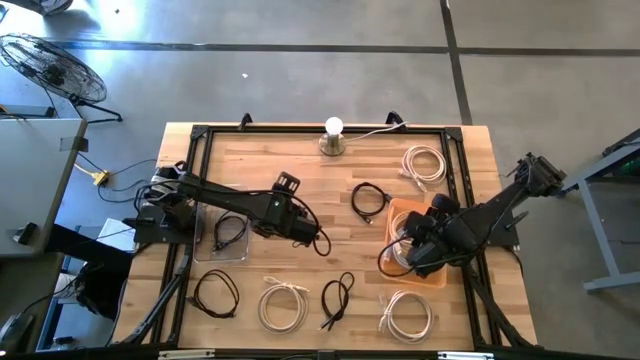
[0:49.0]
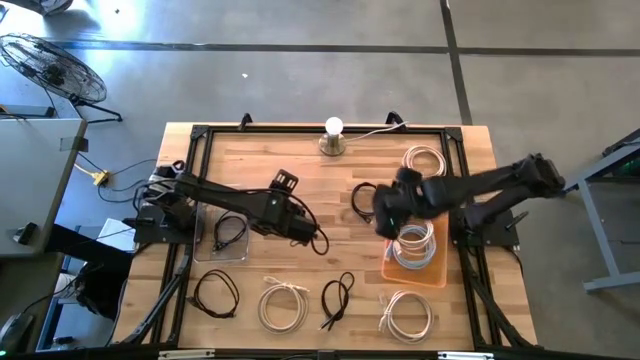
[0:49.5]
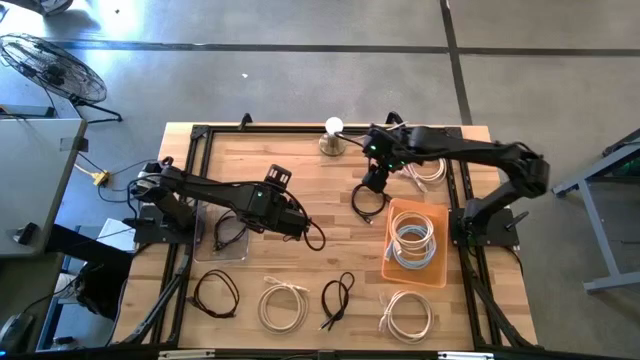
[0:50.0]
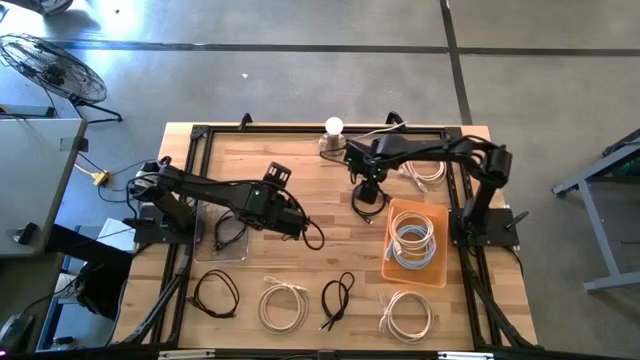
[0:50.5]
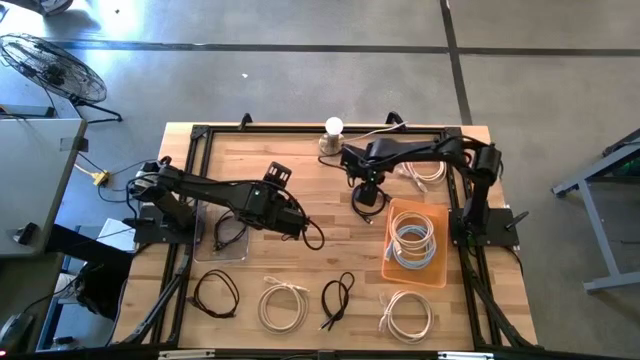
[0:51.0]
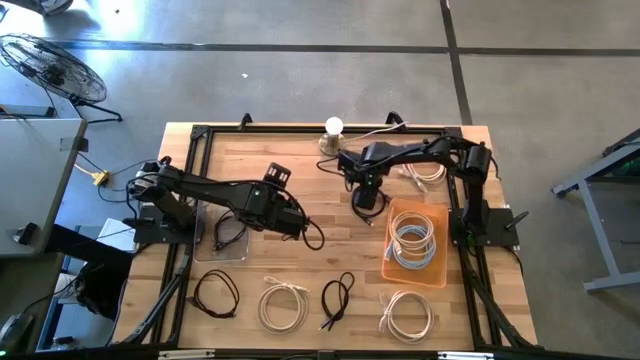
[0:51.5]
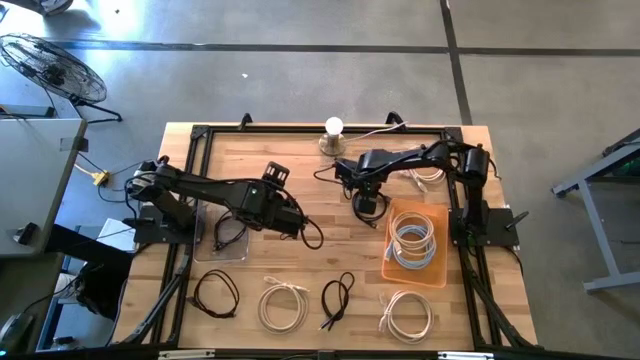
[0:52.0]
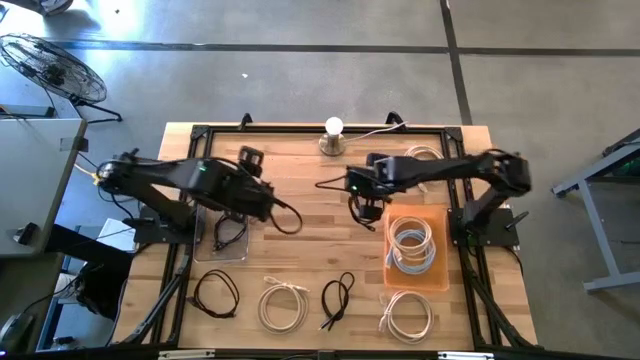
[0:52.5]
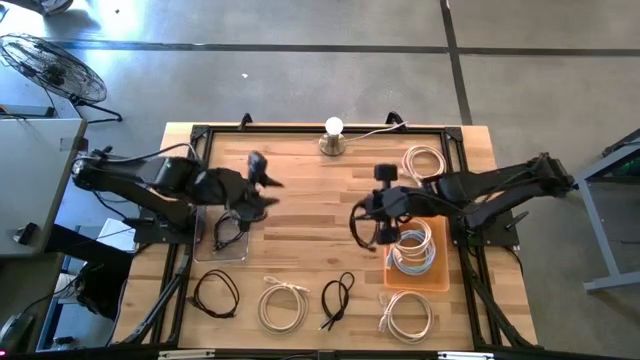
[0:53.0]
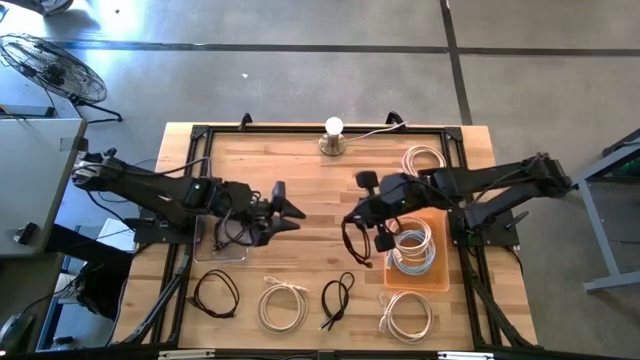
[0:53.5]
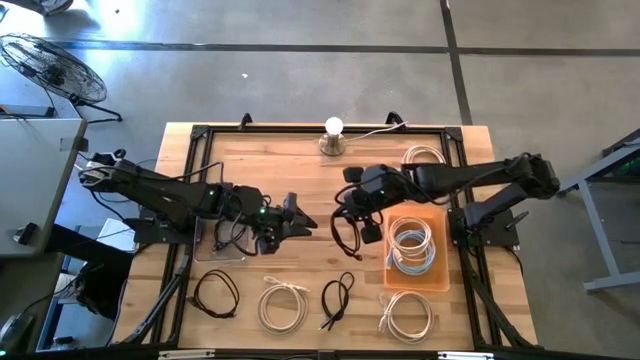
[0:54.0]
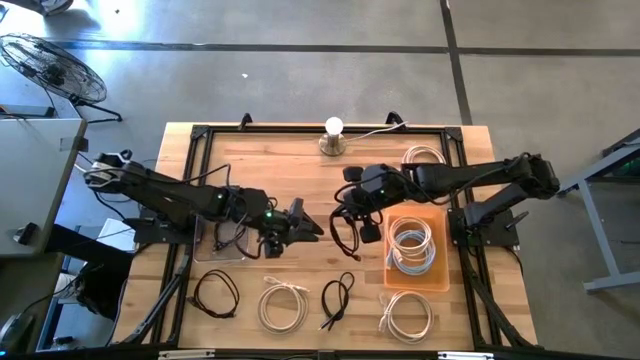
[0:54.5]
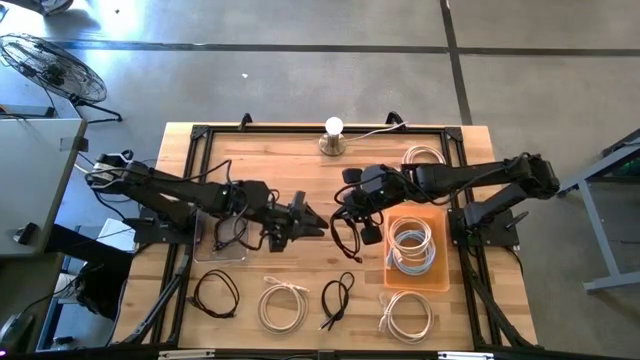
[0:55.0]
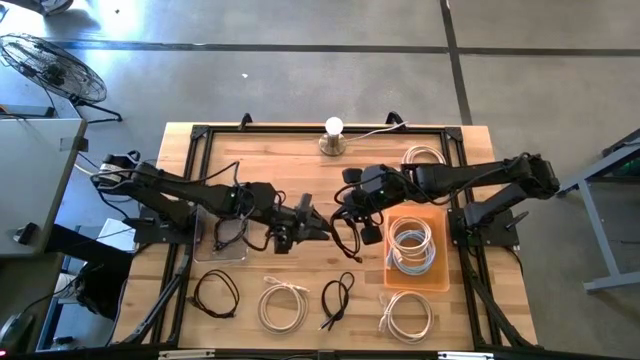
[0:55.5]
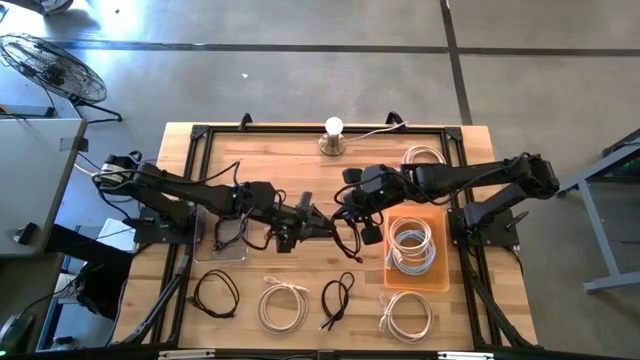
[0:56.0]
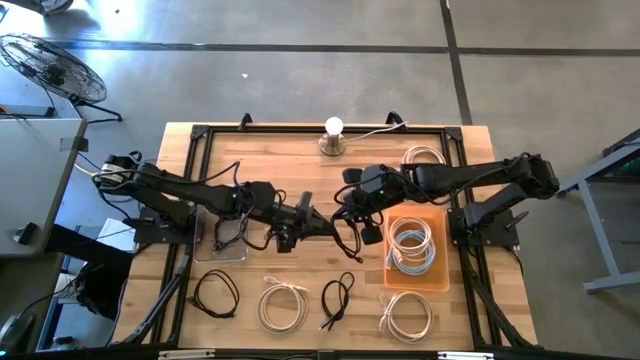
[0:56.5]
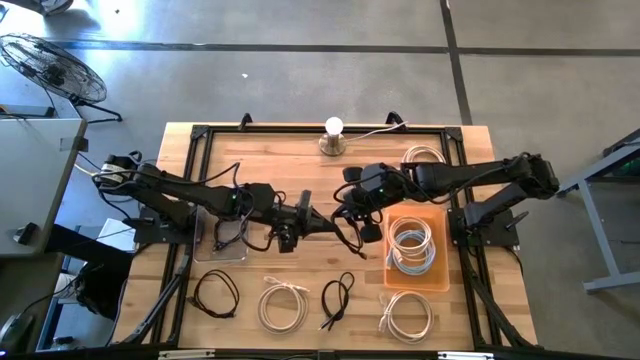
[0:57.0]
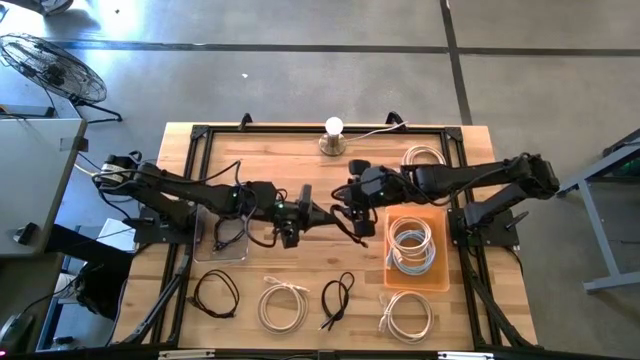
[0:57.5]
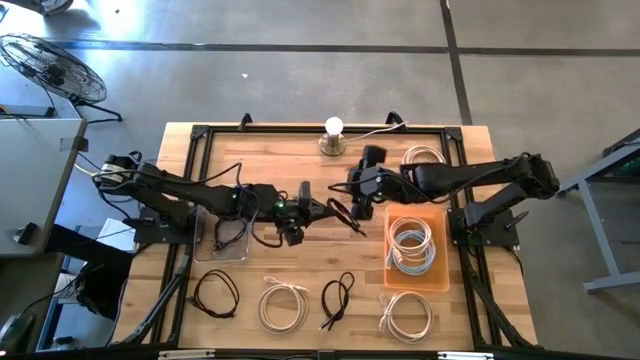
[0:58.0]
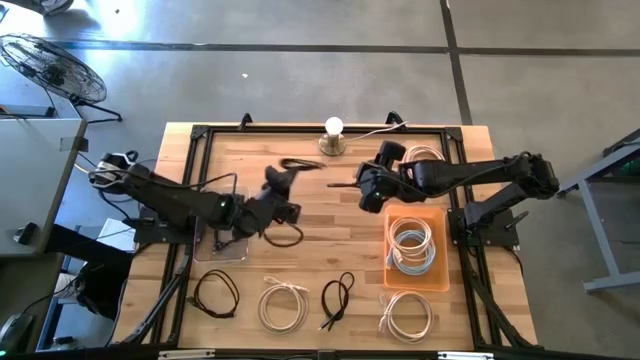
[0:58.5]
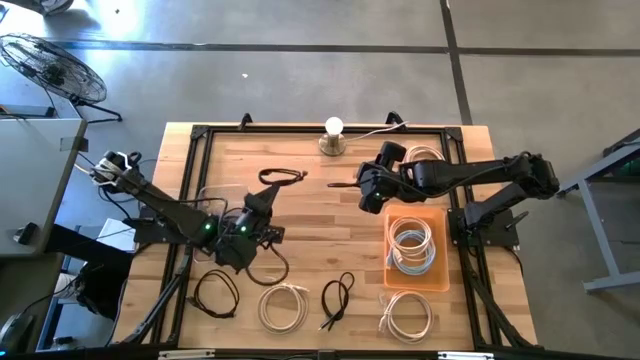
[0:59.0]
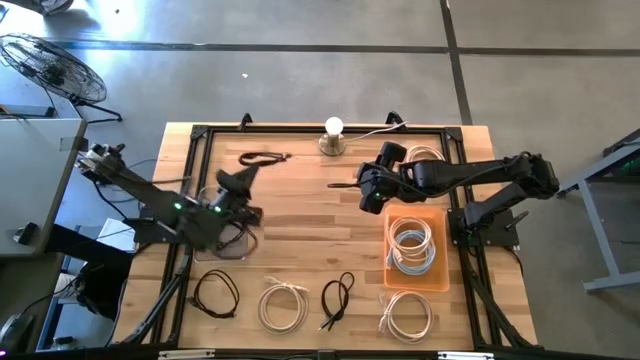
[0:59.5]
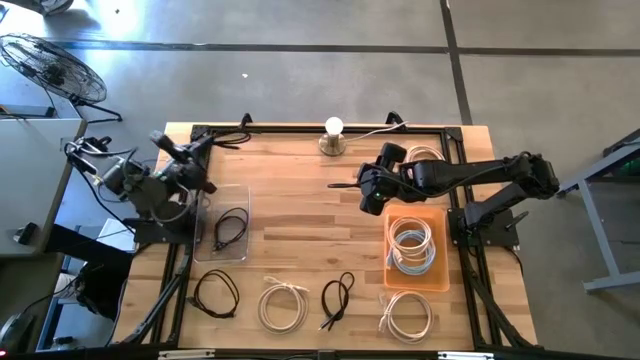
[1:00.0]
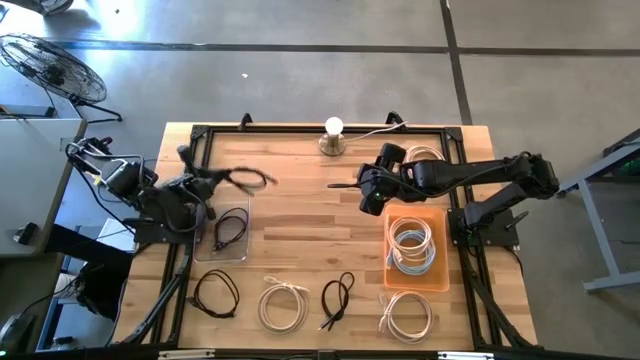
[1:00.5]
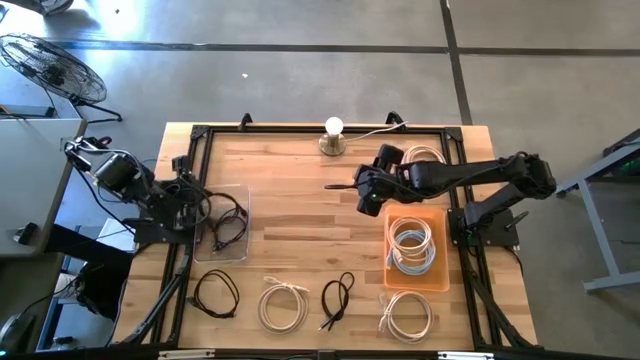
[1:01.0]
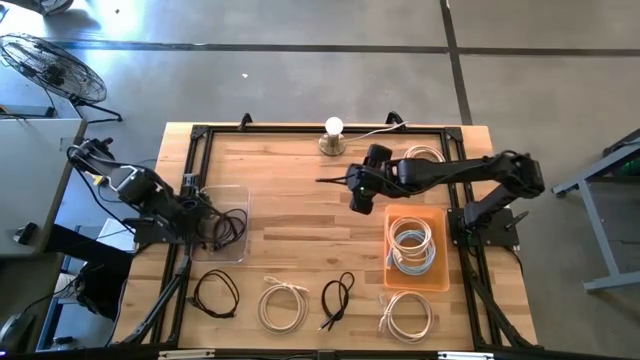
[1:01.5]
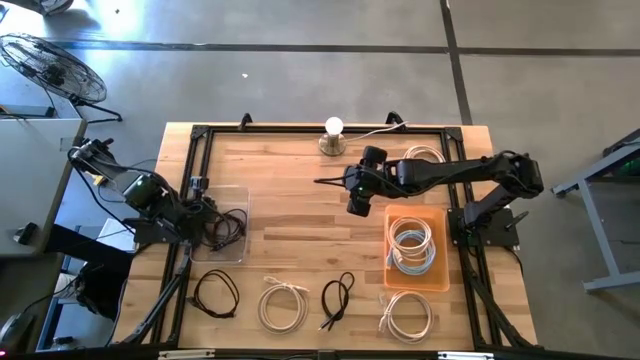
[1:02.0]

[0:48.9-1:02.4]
Task: Pick & Place USB Port
Put the black USB cable into the transparent bin

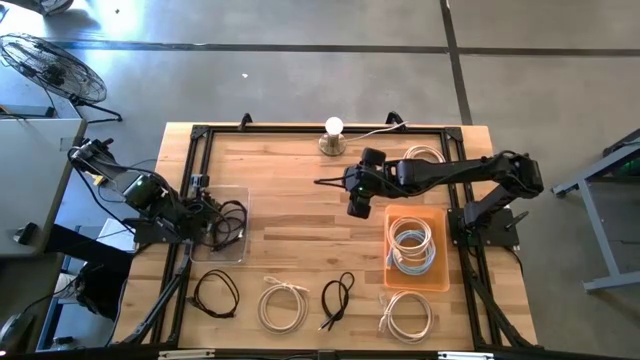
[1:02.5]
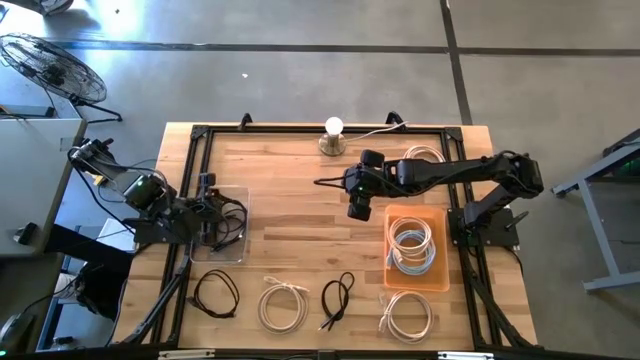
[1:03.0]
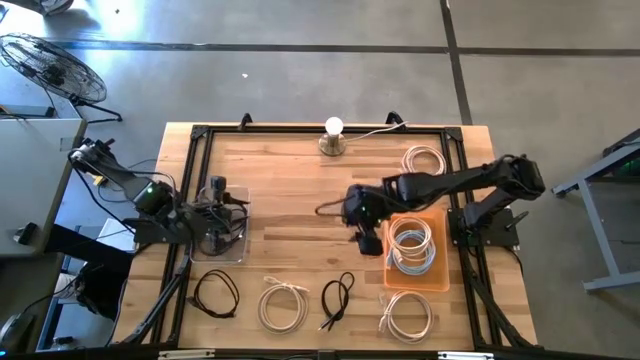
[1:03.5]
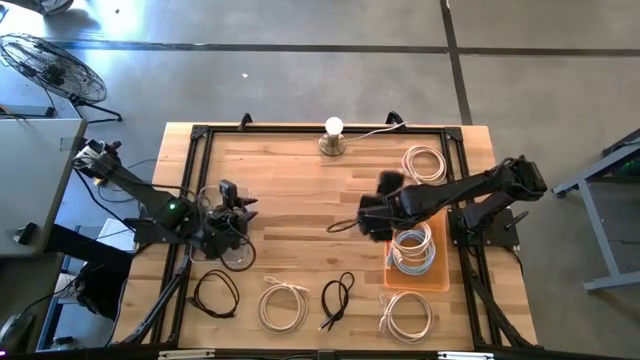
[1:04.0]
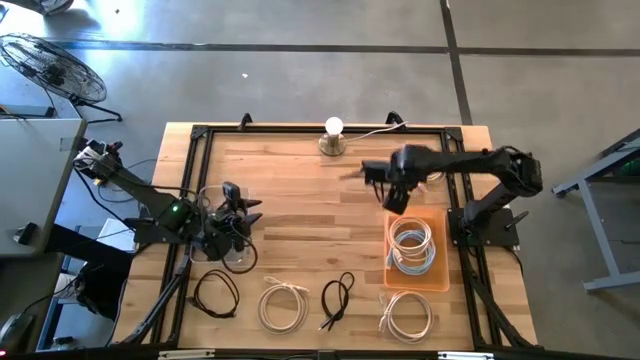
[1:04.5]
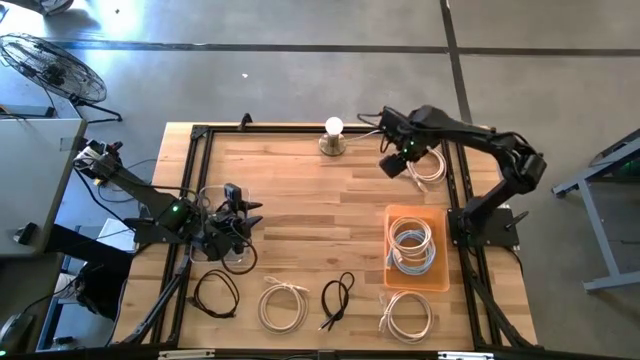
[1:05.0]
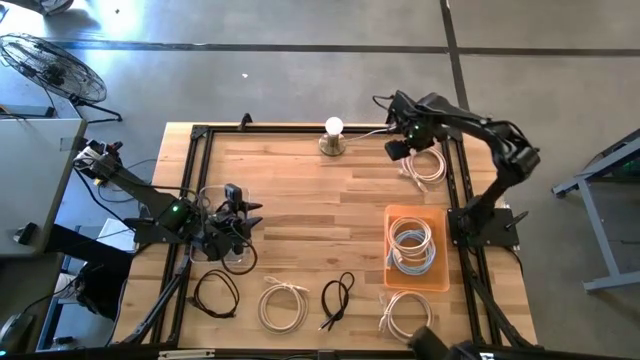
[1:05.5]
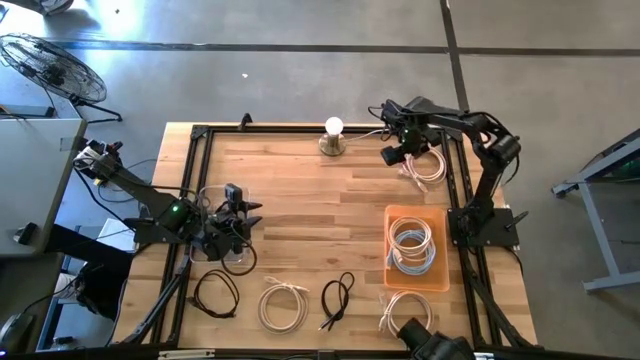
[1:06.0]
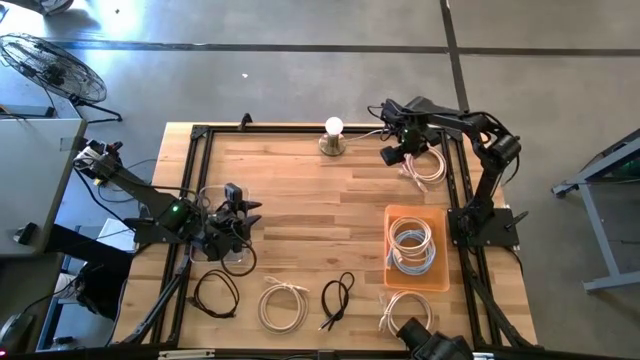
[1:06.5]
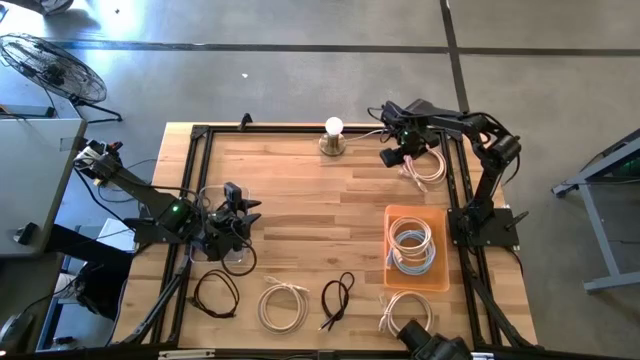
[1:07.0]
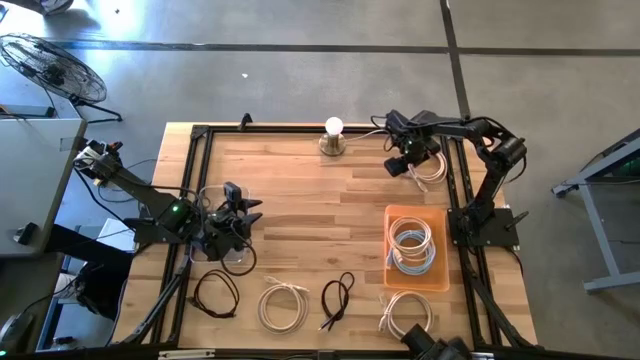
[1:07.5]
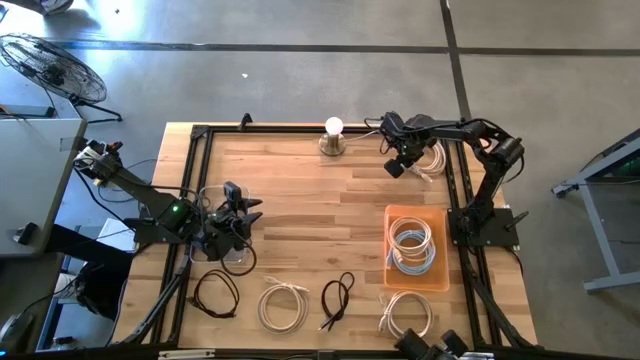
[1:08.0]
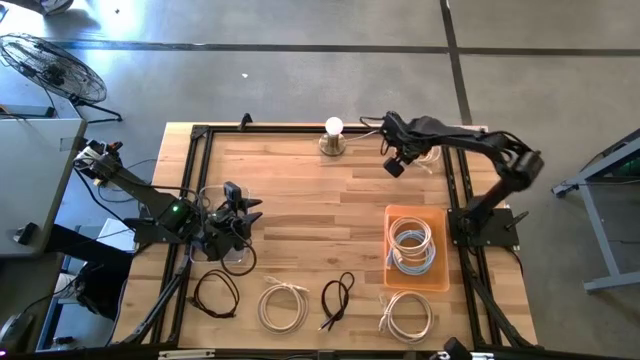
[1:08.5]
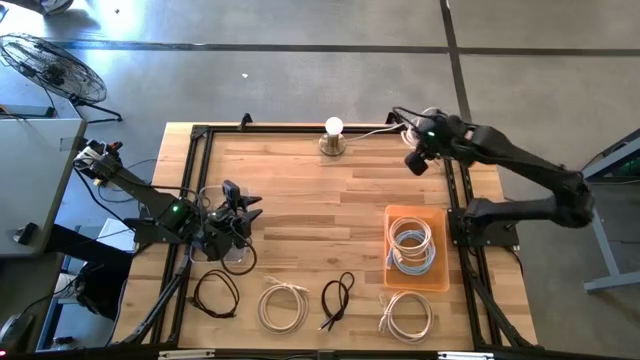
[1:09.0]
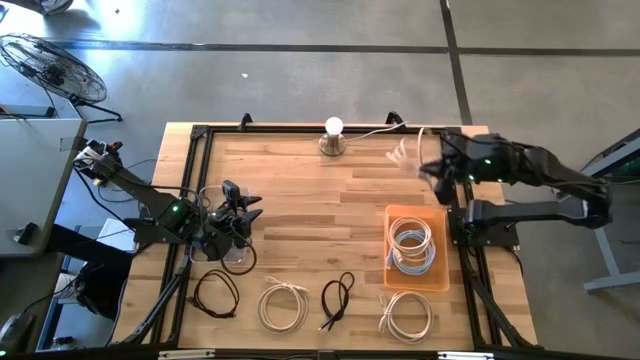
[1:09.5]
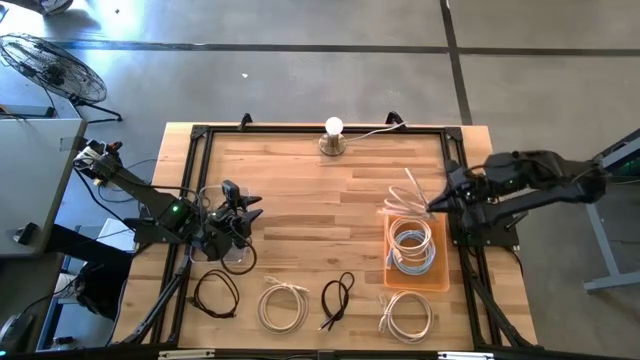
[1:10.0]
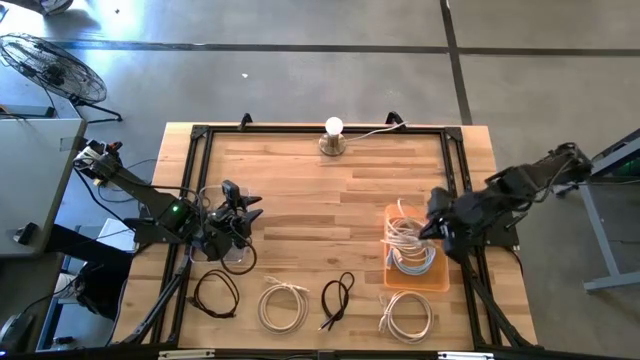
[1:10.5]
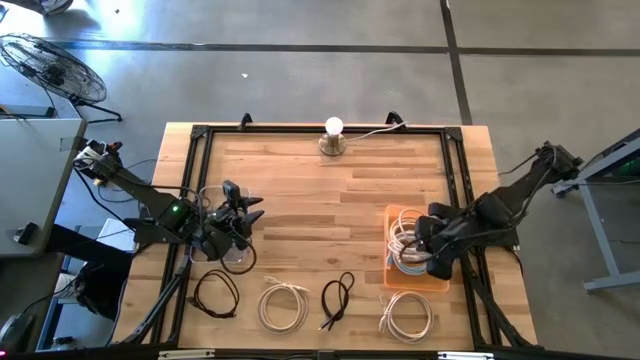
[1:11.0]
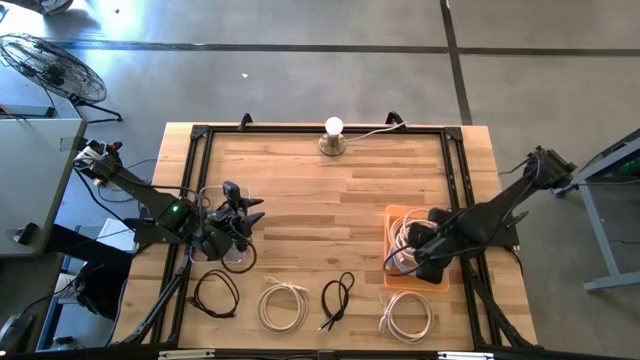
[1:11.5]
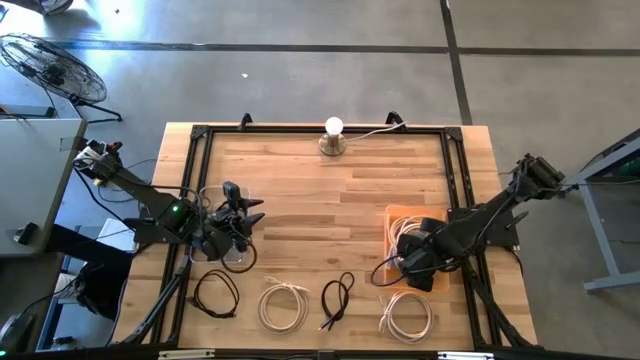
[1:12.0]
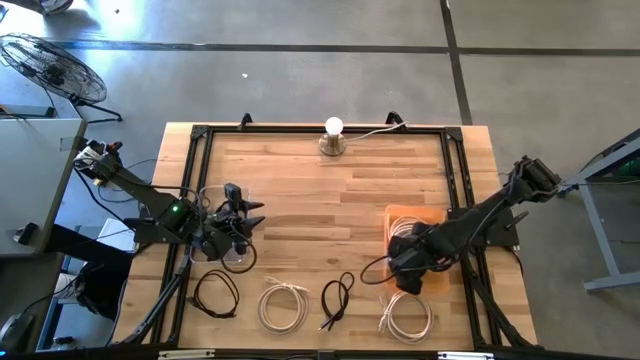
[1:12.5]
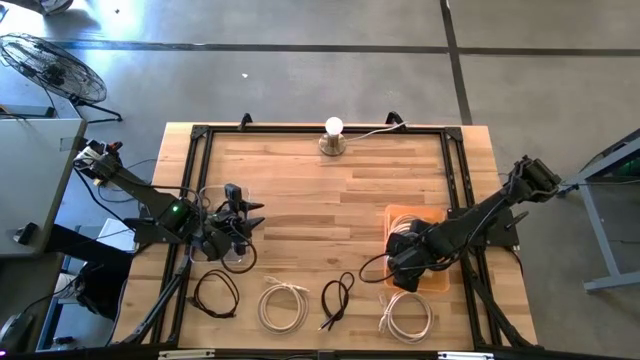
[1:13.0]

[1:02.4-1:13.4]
Put the brown HDMI cable into the orange bin
